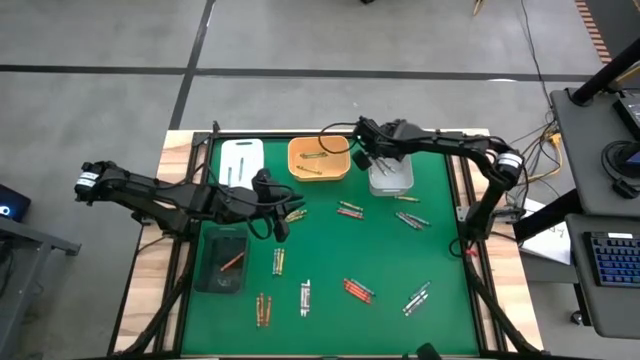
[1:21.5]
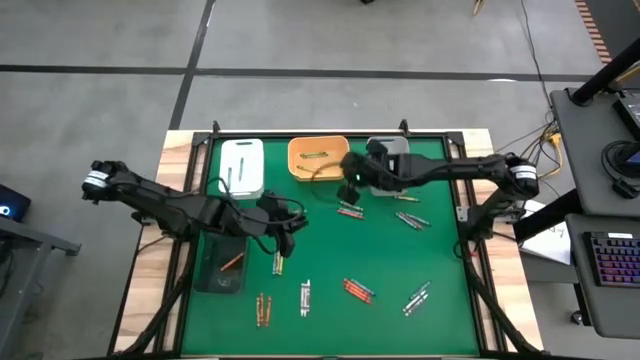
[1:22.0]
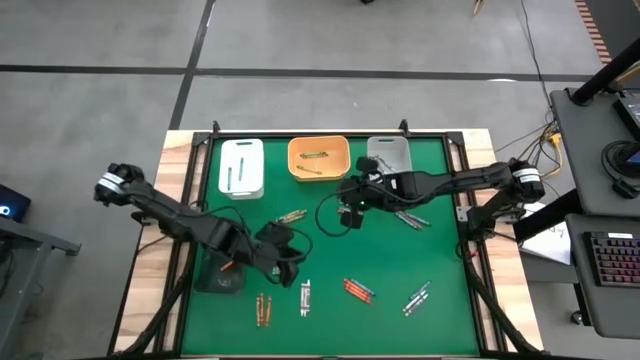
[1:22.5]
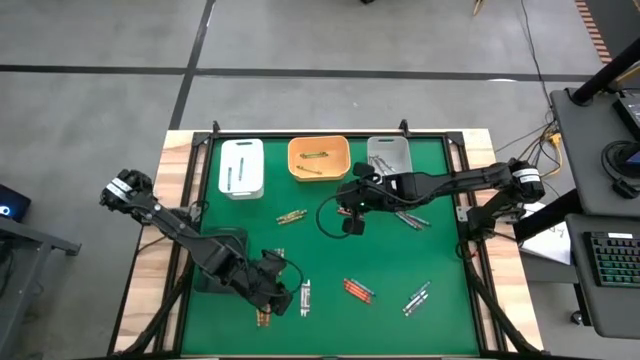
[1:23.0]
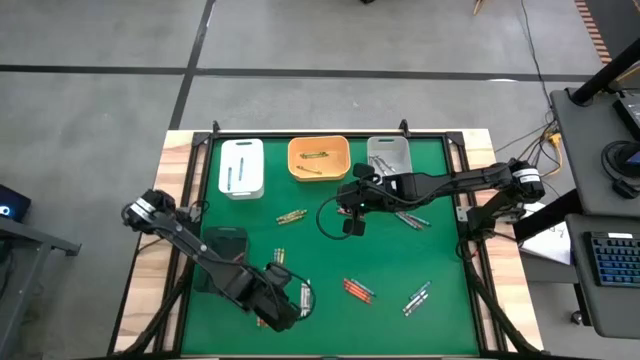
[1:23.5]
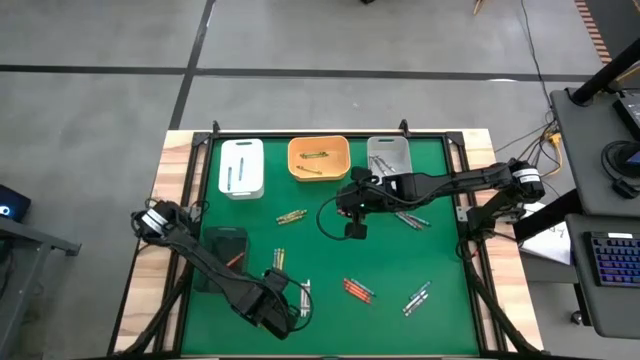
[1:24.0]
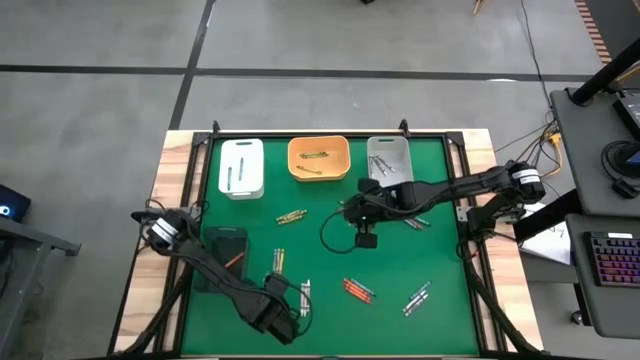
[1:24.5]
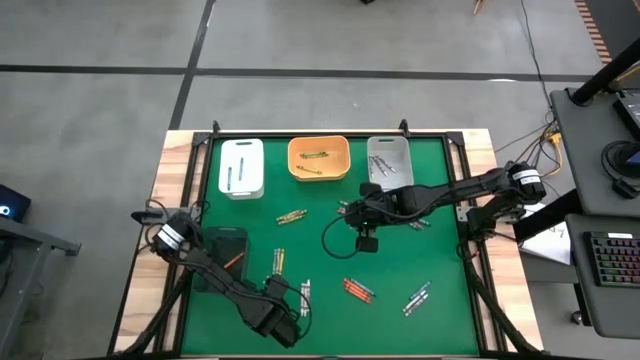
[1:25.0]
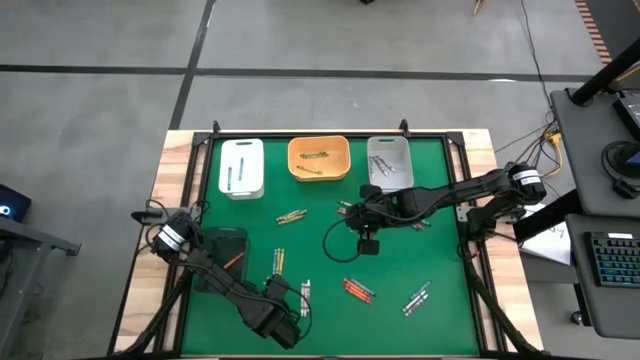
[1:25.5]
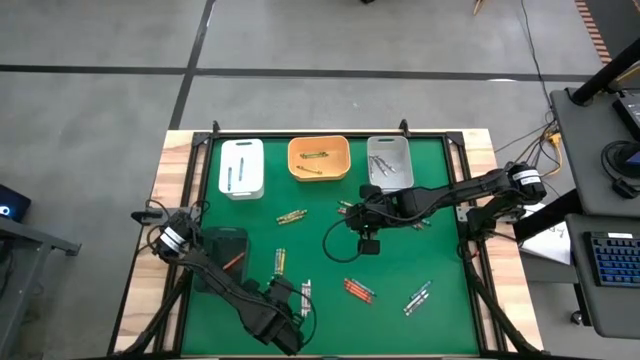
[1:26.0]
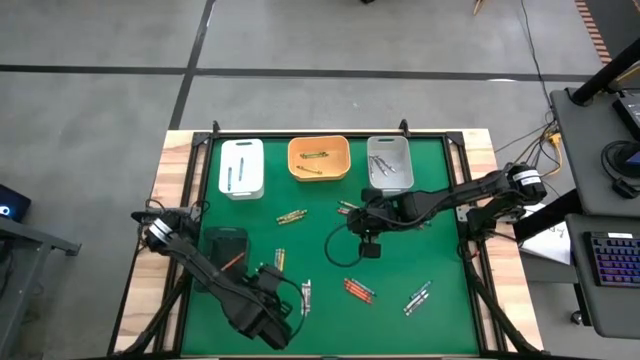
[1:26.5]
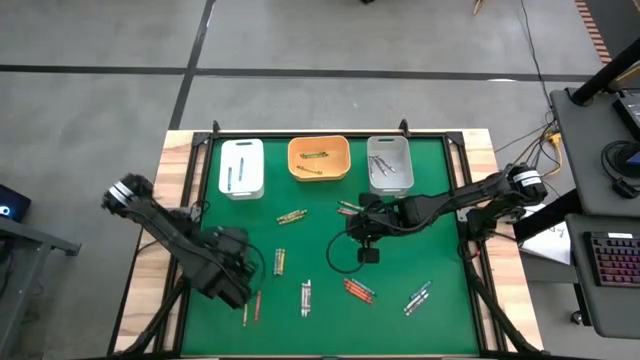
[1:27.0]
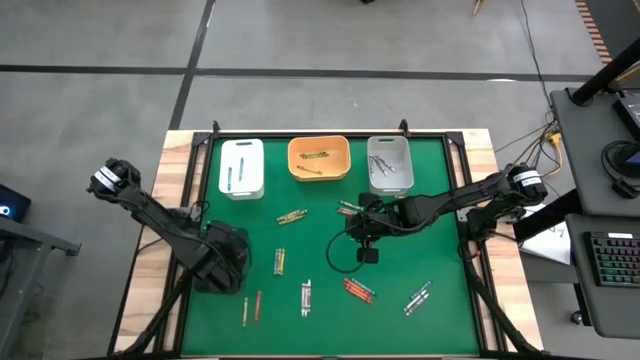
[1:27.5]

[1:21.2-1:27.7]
Task: Sort crayons
Put the orange crayon into the black bin

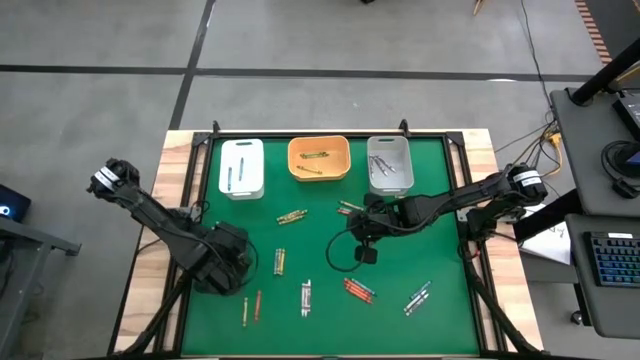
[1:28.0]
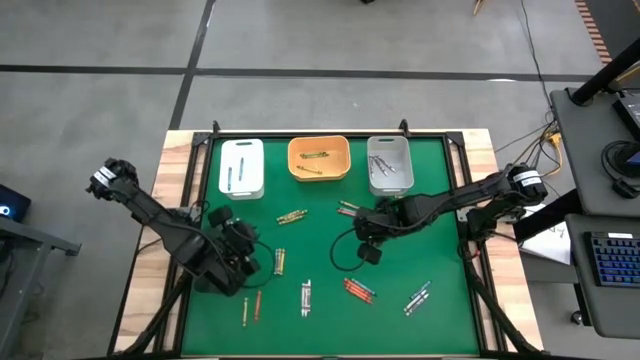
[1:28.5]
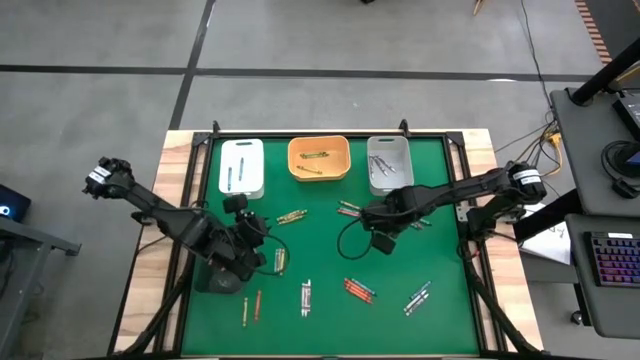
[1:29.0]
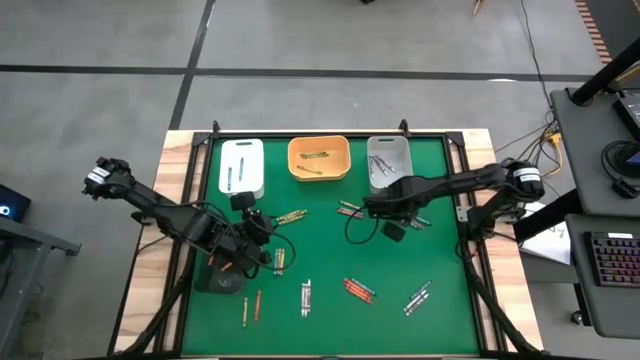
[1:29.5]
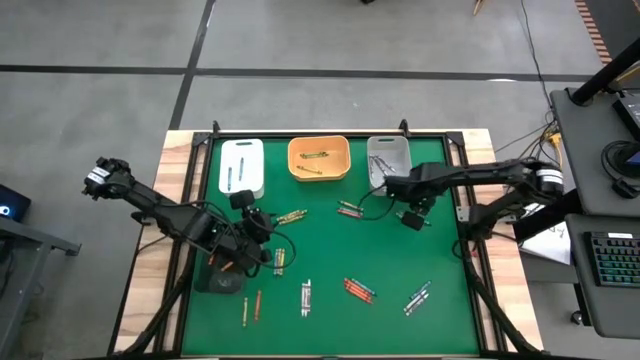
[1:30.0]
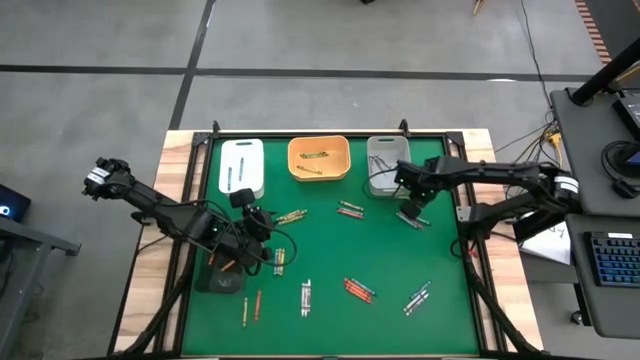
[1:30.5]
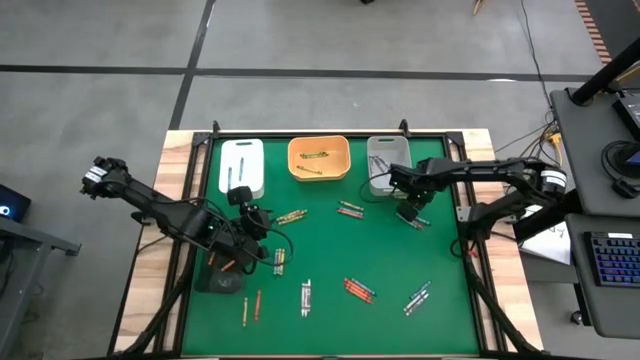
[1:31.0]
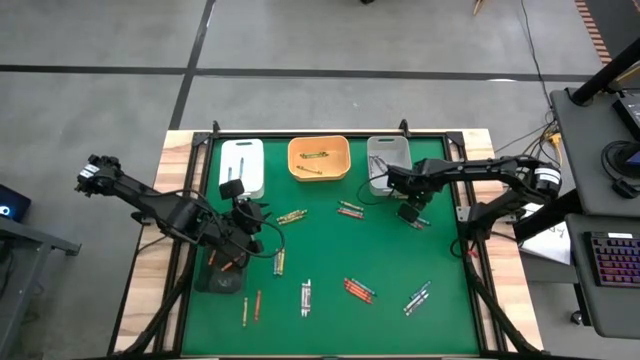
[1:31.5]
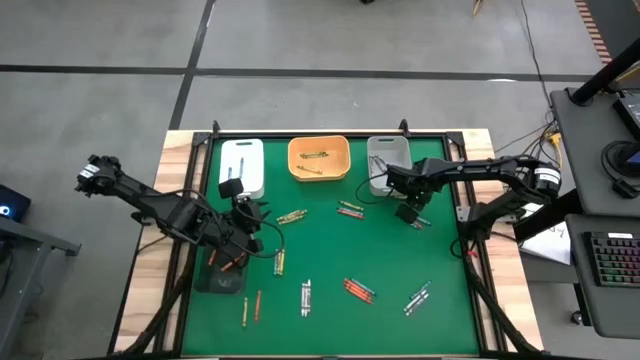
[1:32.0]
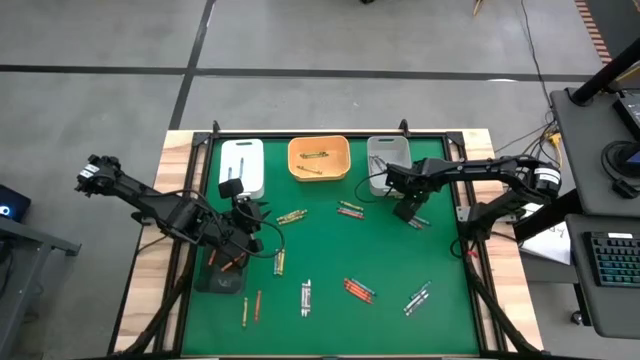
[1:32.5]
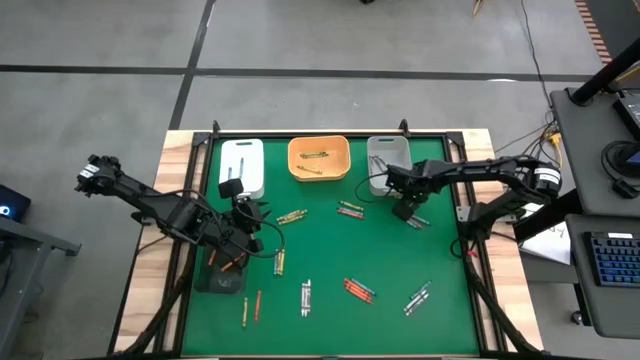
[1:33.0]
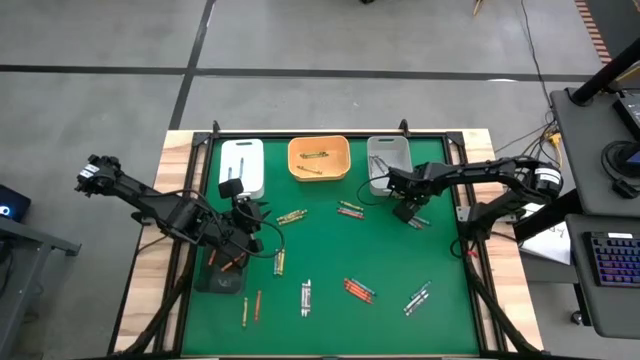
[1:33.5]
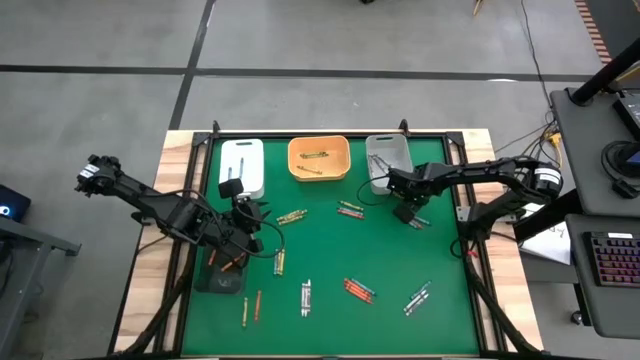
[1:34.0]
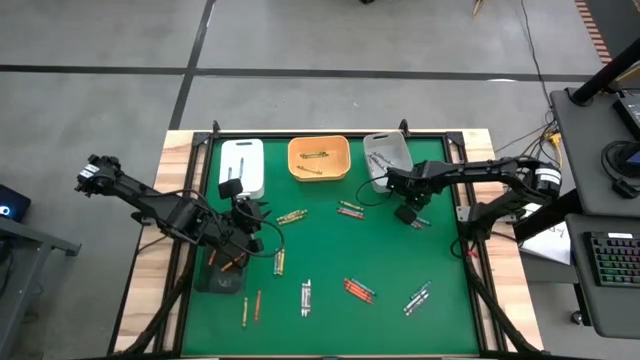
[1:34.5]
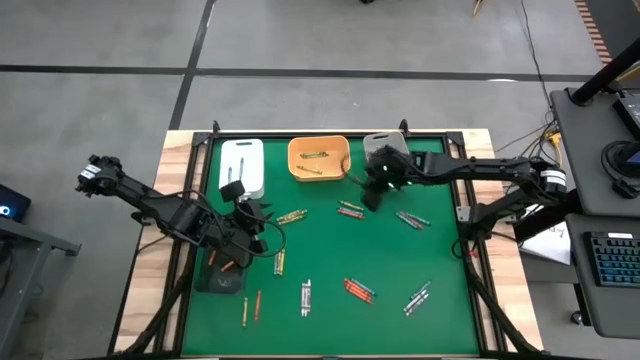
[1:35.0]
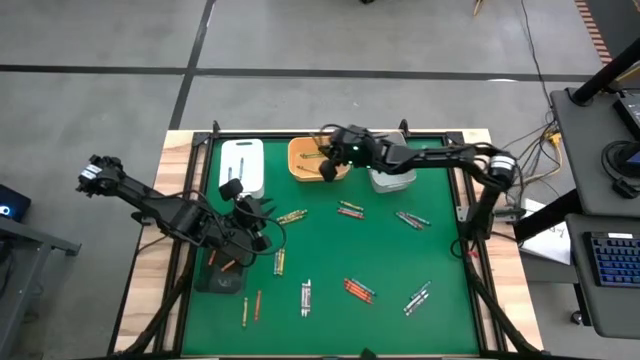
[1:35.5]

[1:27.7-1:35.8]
Put the green crayon into the yellow bin

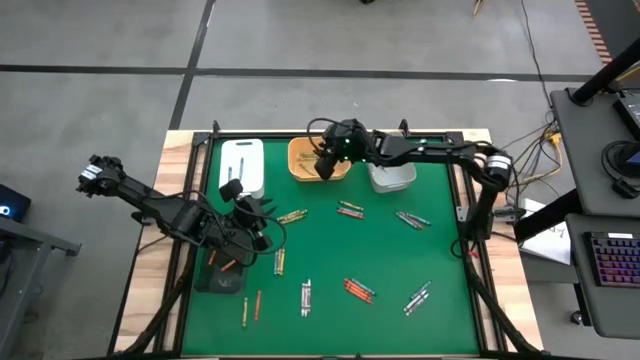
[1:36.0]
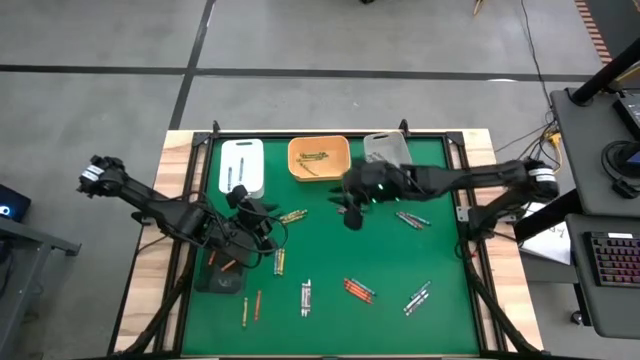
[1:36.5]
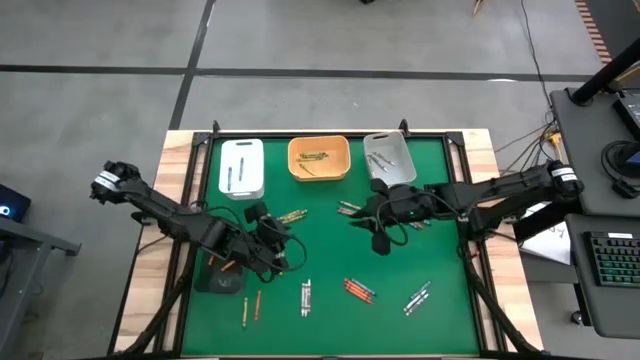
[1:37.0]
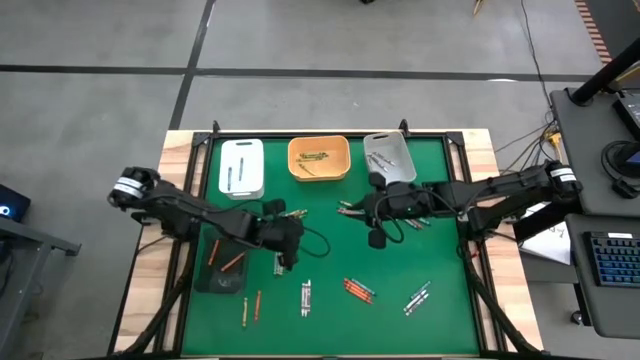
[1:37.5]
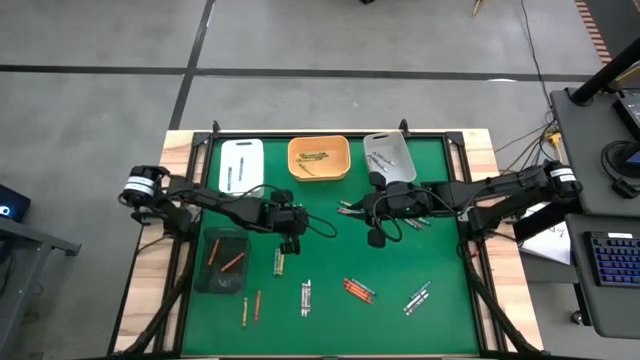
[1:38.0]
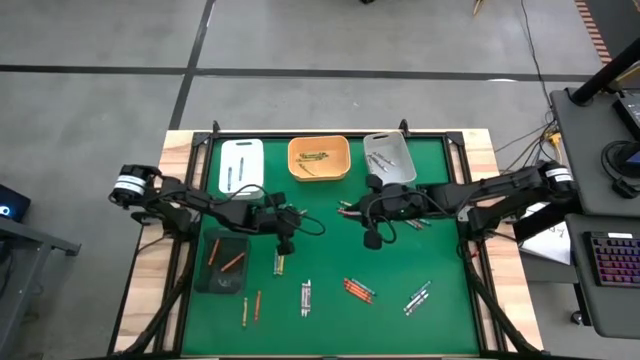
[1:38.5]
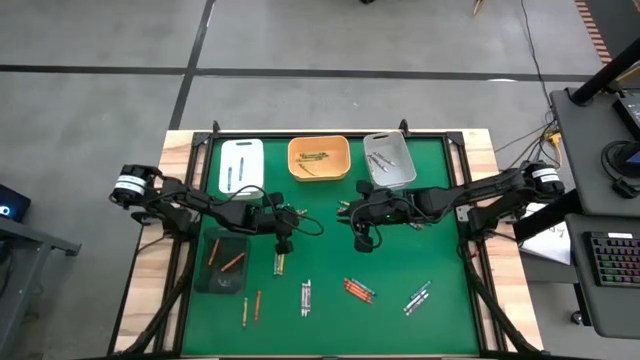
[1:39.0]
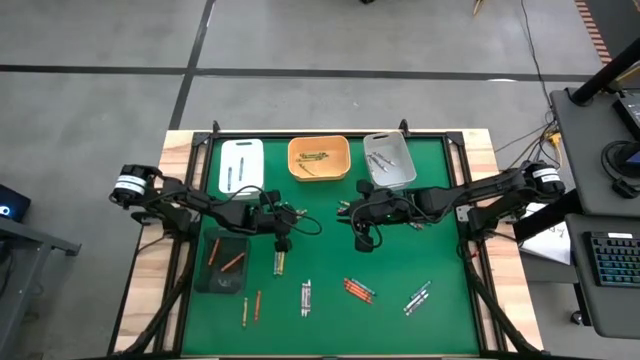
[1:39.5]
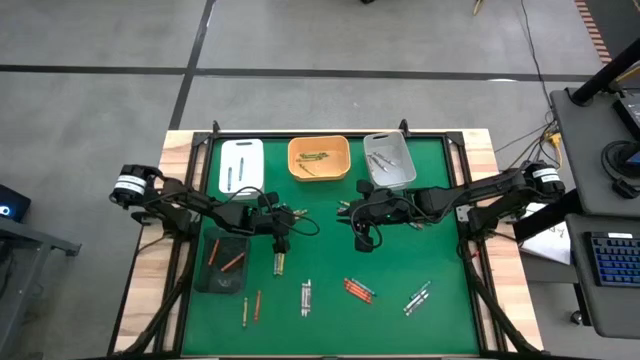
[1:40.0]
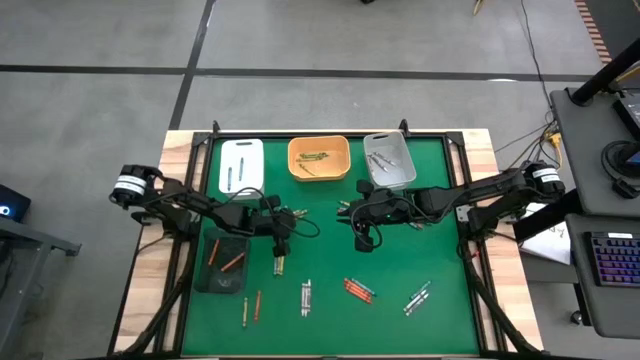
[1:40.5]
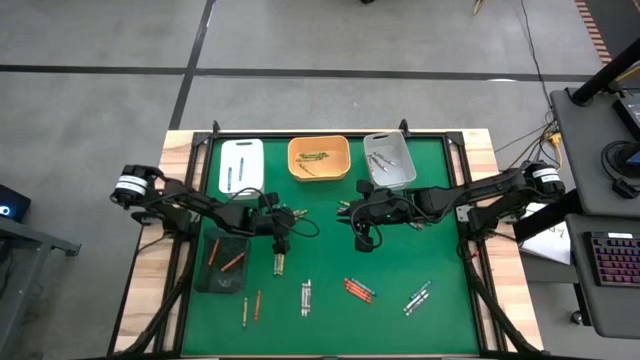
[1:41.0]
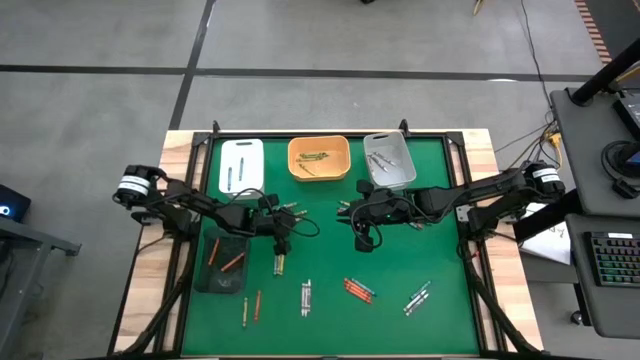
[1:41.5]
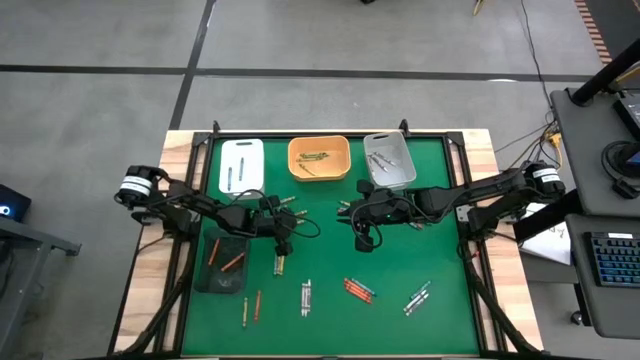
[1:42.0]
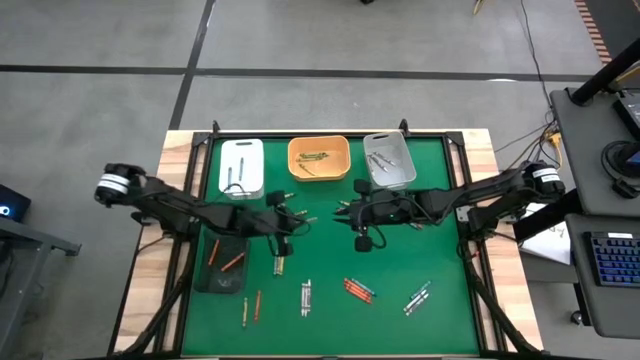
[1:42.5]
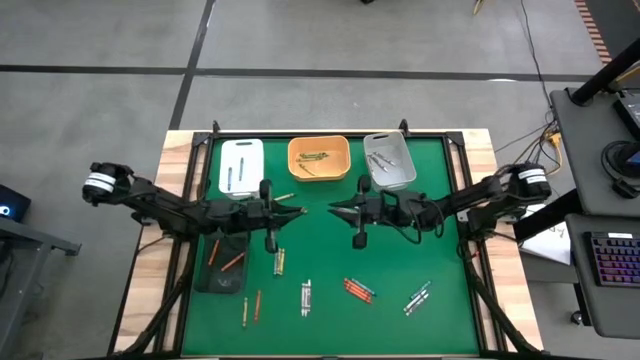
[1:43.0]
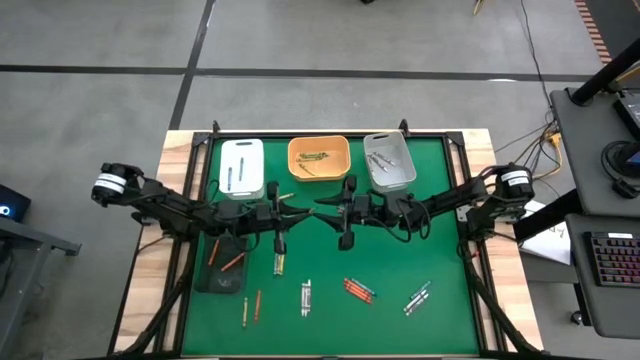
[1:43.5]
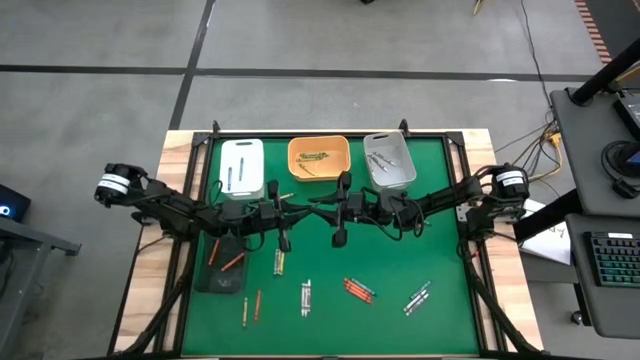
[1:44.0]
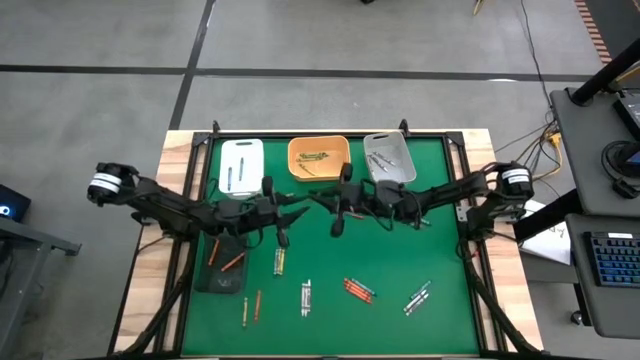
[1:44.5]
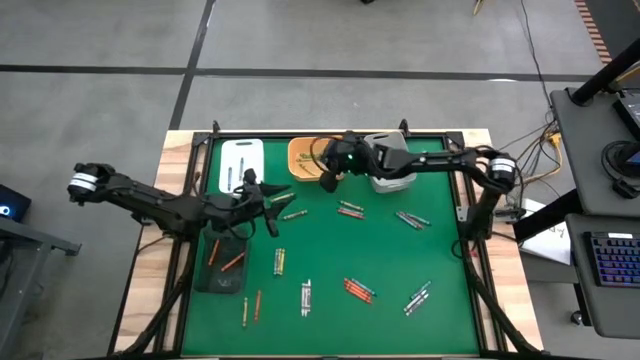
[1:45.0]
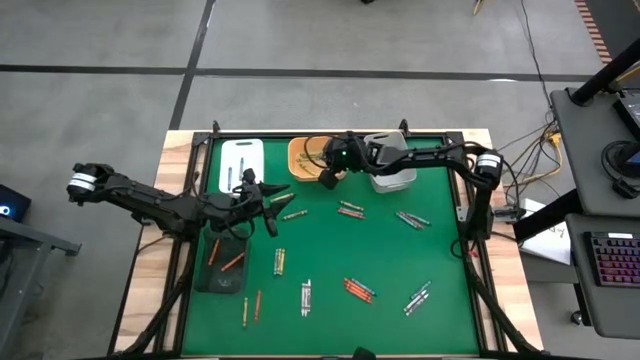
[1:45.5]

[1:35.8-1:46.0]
Put the green crayon into the yellow bin
